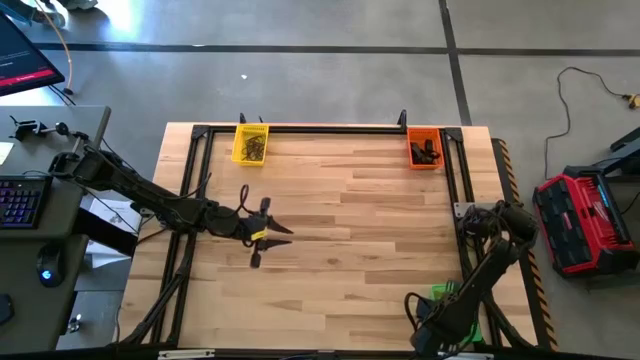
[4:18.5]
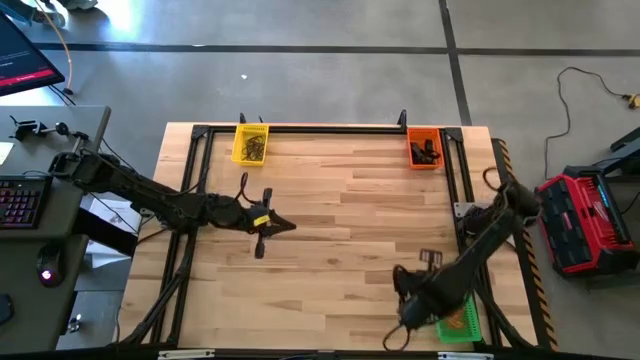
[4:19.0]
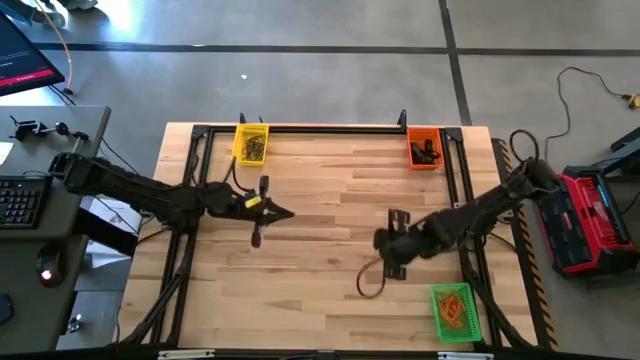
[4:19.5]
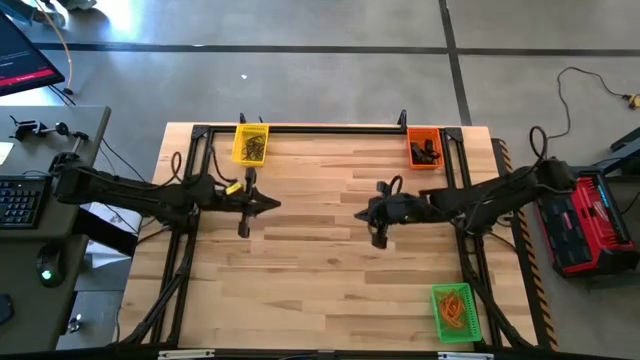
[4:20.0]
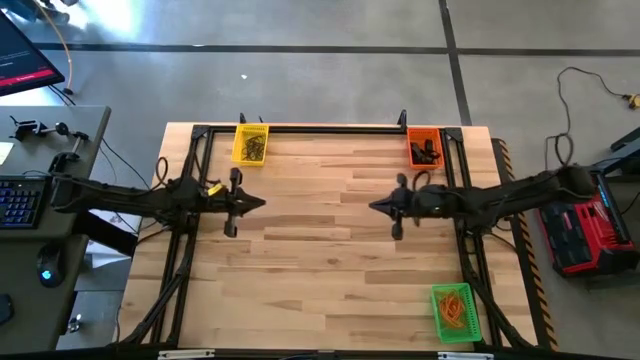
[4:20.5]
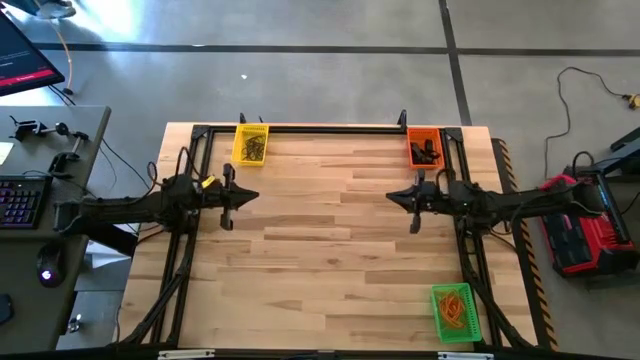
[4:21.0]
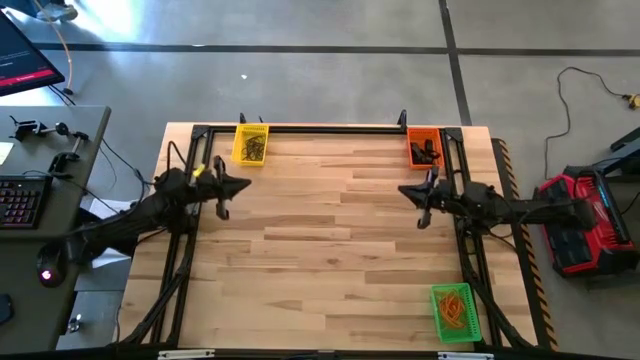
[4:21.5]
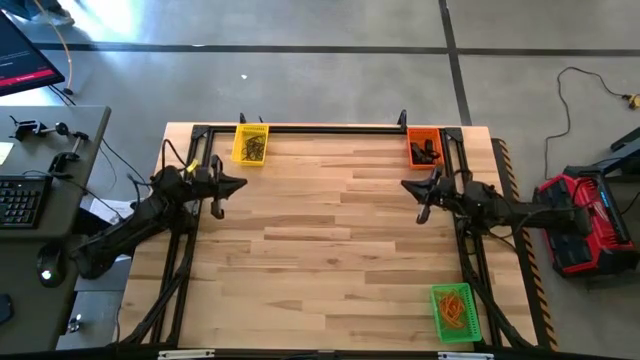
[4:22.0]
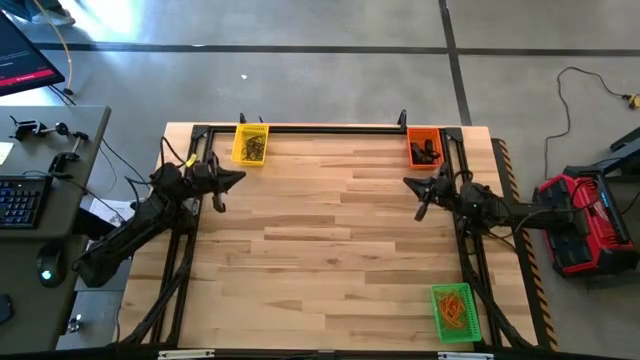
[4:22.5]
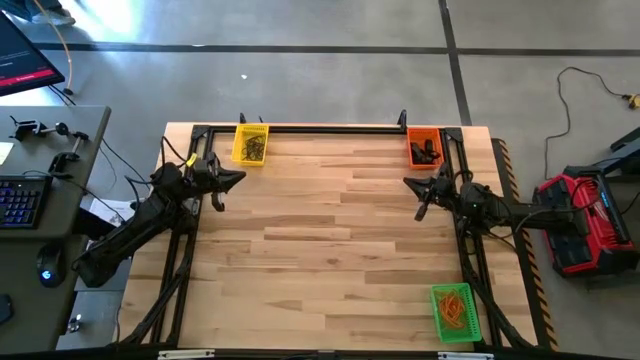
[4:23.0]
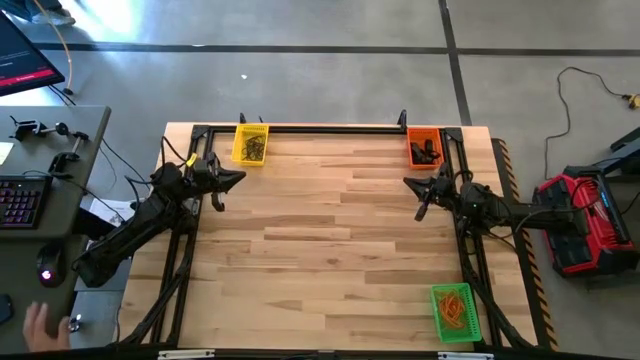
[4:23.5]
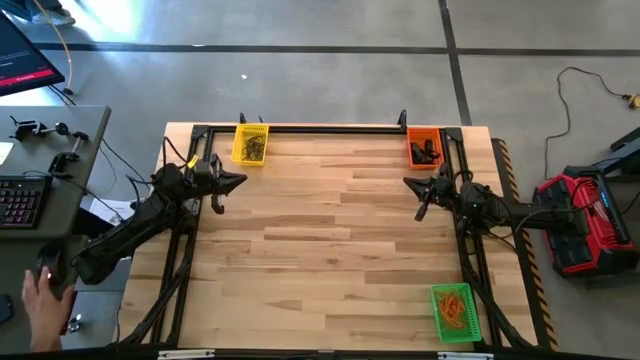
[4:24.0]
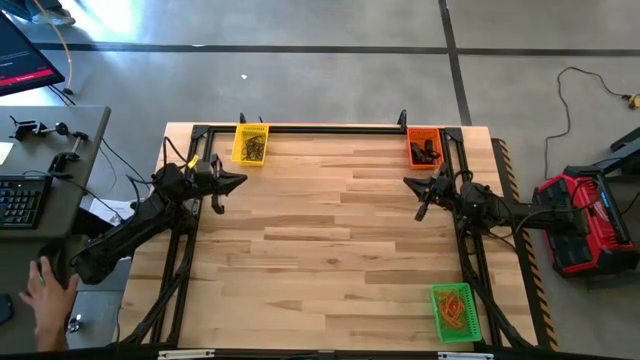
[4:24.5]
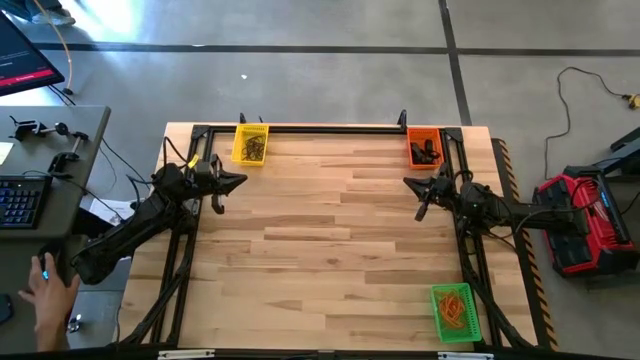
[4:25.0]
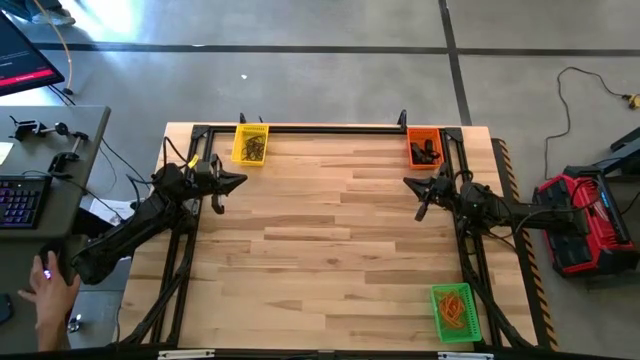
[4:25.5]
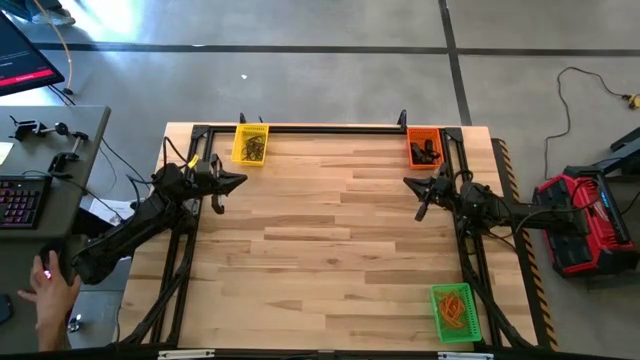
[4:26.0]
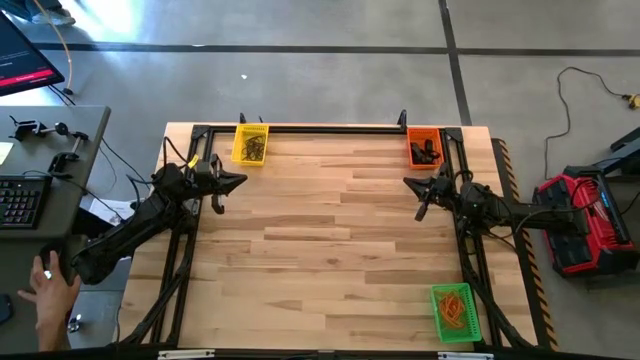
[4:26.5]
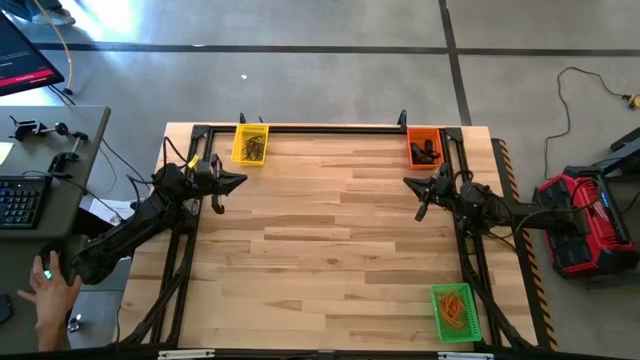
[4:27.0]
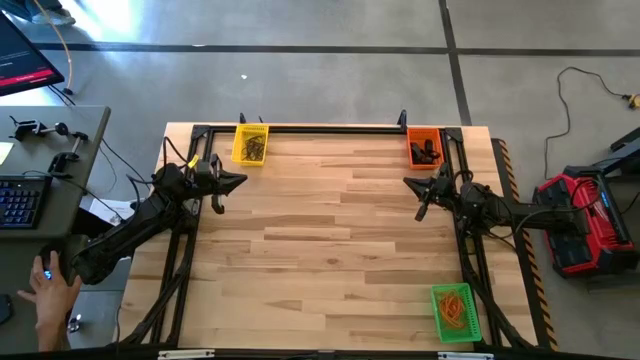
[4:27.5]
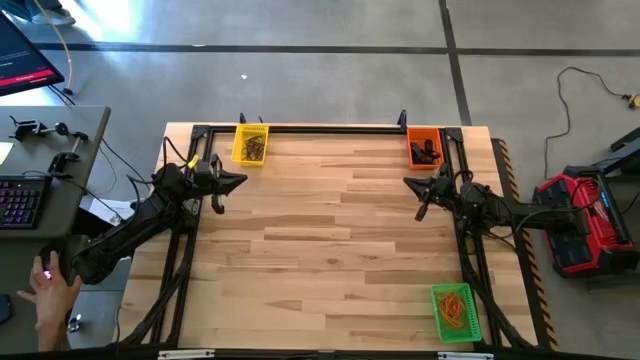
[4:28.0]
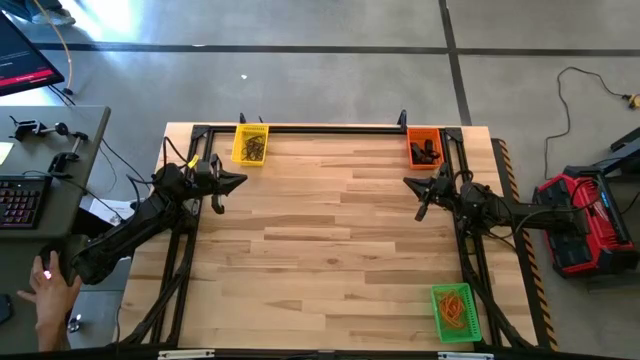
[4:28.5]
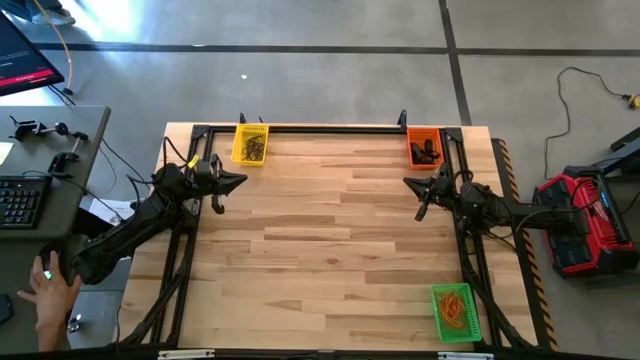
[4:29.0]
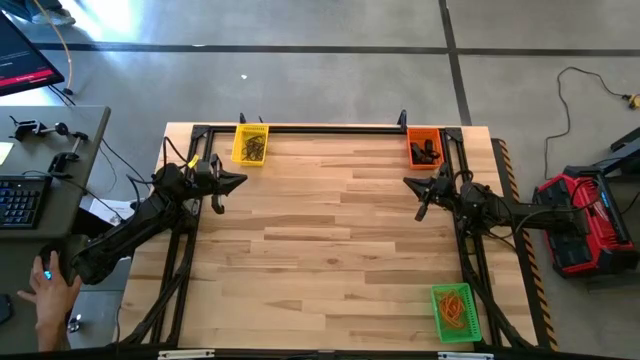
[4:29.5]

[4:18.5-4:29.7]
Task: Sort rubber bands into baskets
Return to Home Position

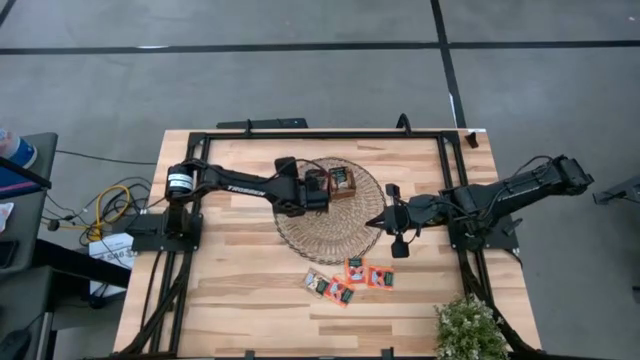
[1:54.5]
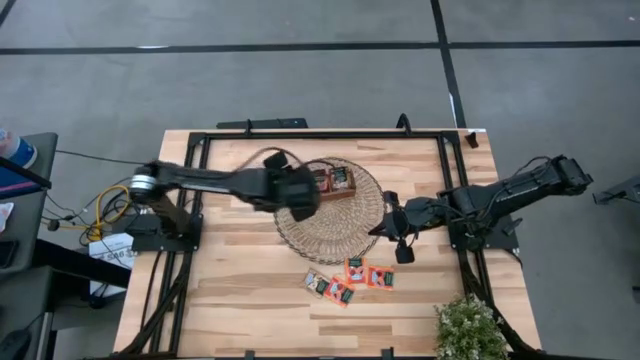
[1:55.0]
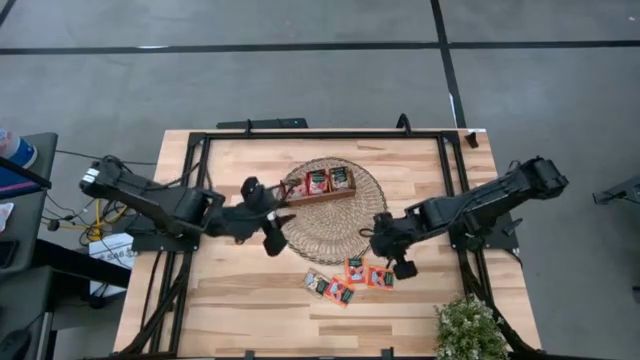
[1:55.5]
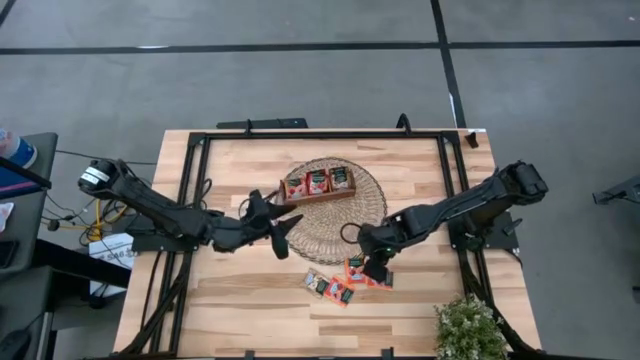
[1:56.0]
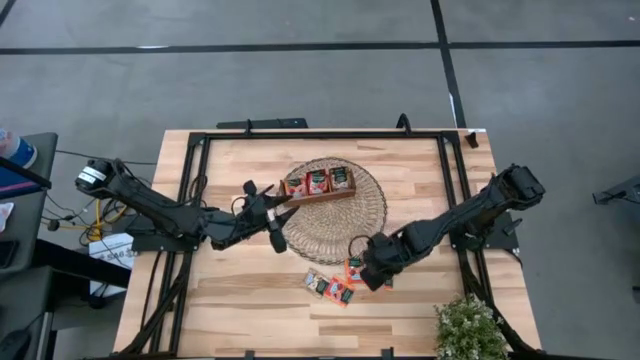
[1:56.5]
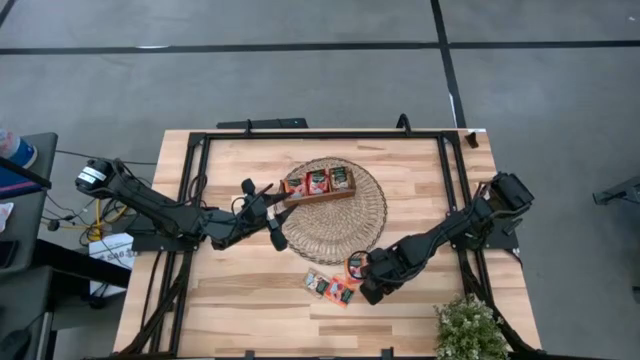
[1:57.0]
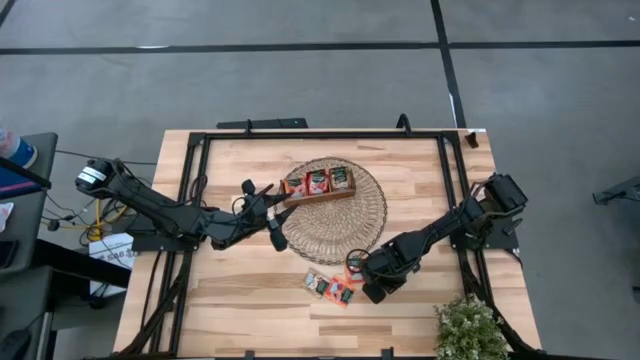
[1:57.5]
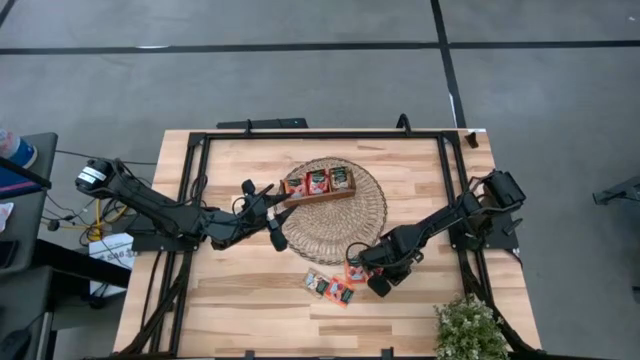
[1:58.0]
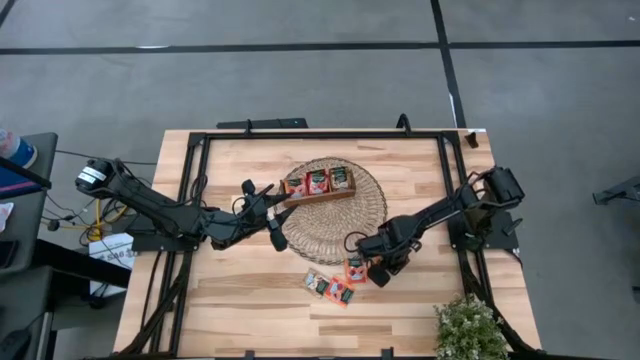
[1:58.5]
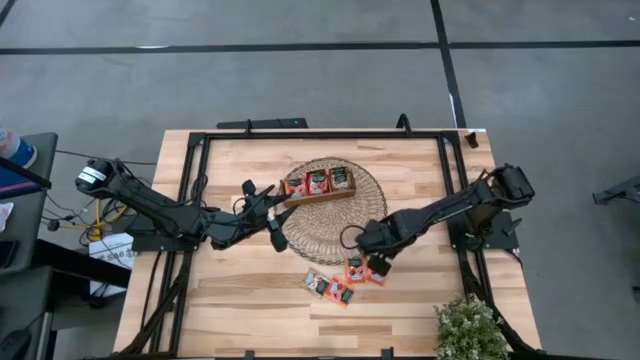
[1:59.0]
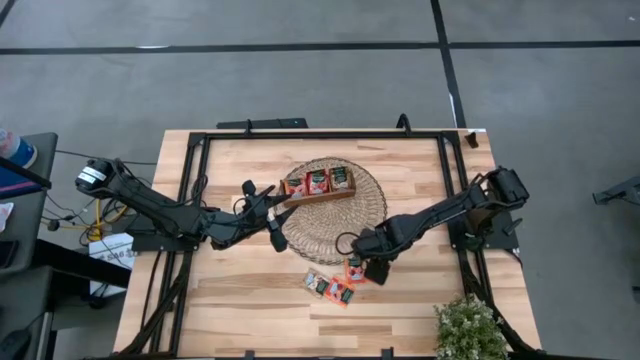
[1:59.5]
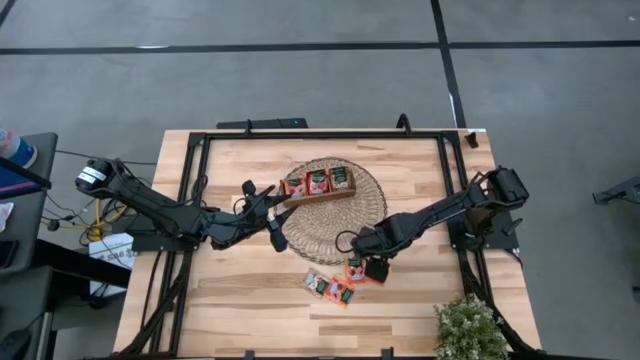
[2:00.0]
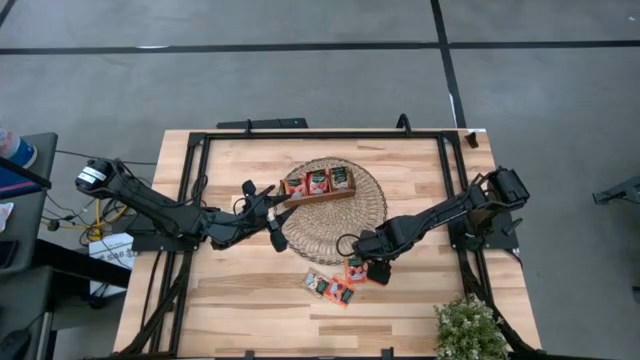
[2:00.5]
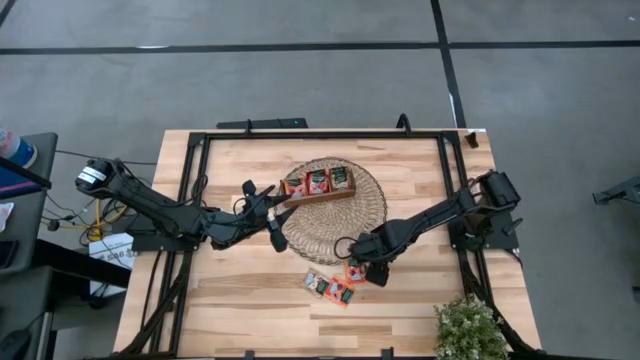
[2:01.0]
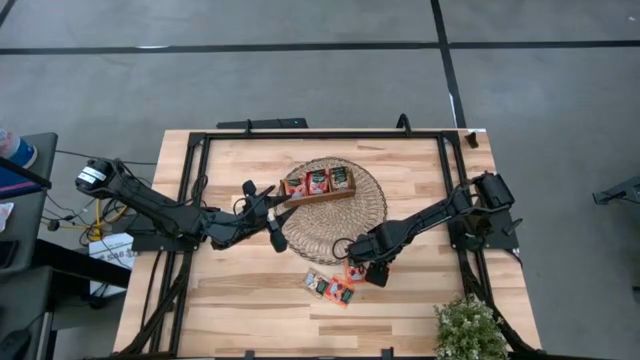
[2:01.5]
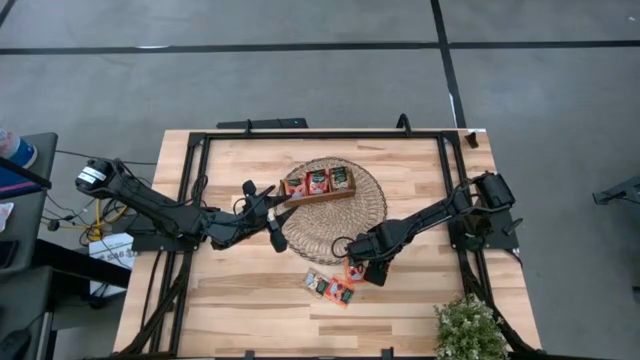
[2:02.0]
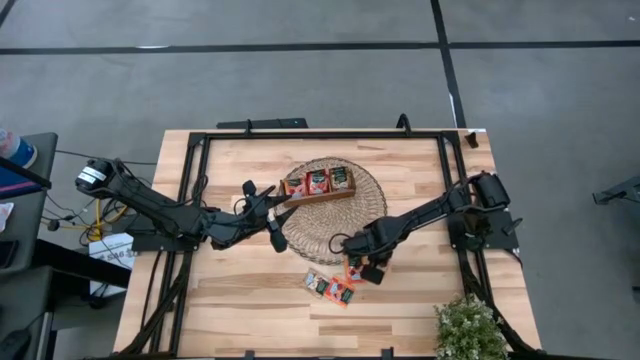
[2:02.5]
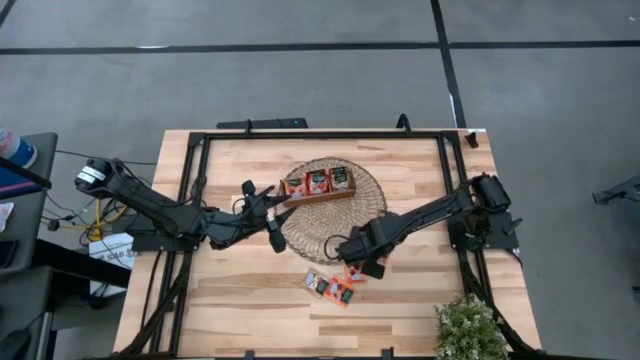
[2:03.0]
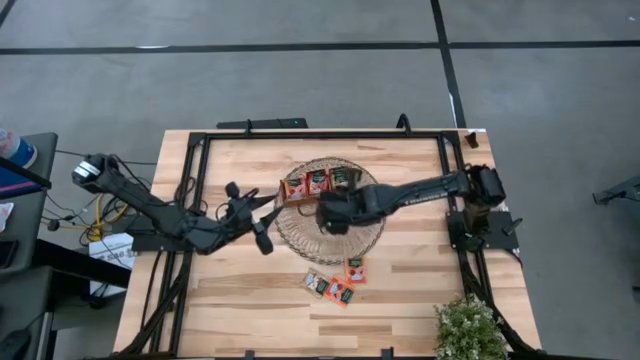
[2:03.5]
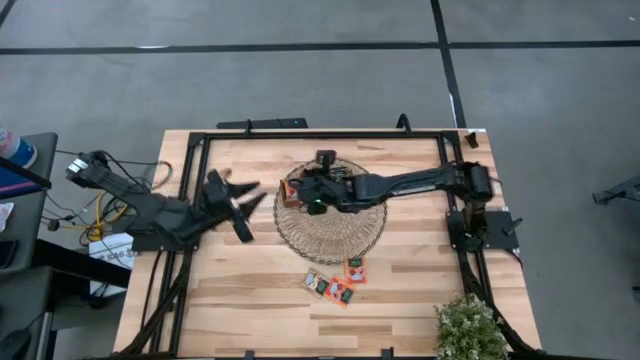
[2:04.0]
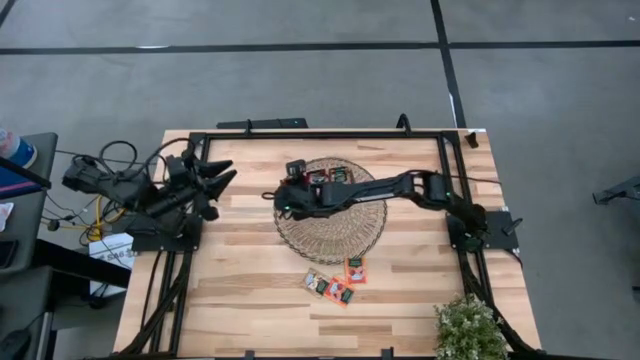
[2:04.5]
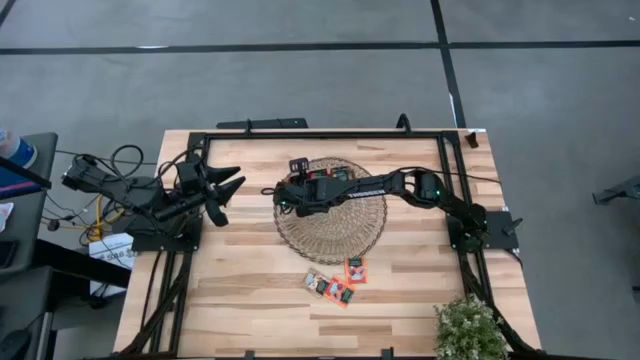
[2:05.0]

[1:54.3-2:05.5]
Task: Pick & Place Tea
Put the right orange tea bag into the left side of the wooden organizer
